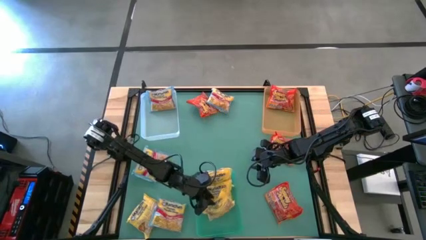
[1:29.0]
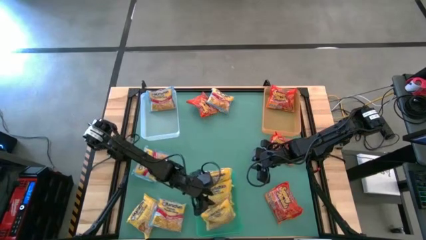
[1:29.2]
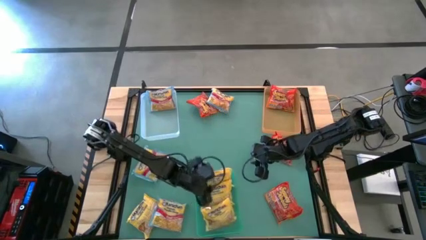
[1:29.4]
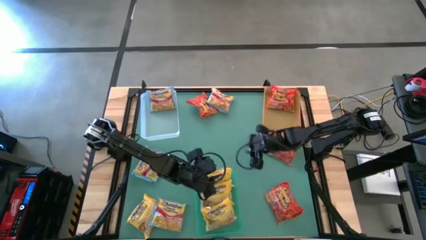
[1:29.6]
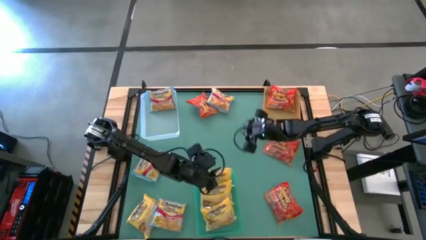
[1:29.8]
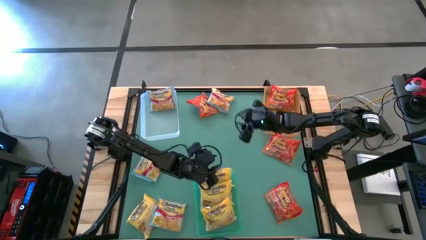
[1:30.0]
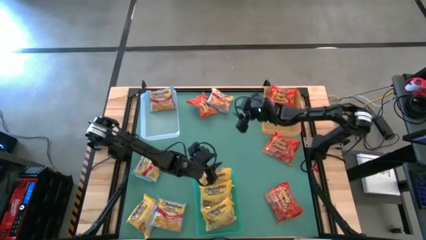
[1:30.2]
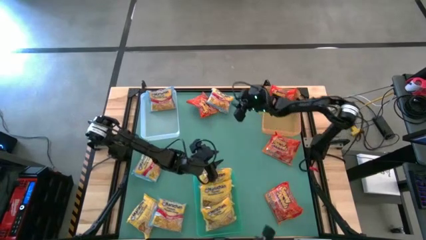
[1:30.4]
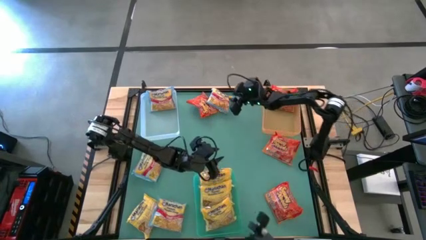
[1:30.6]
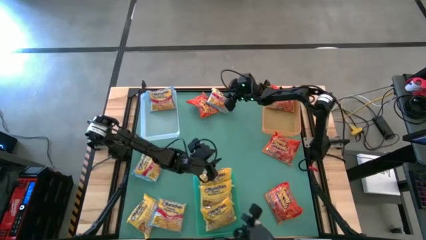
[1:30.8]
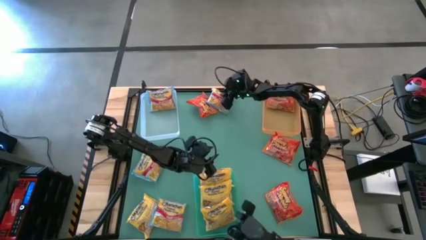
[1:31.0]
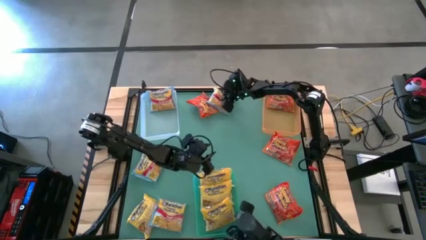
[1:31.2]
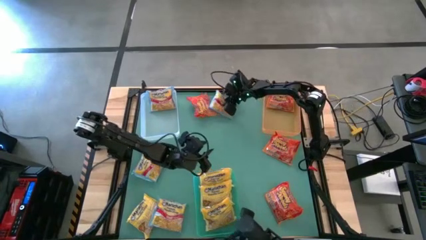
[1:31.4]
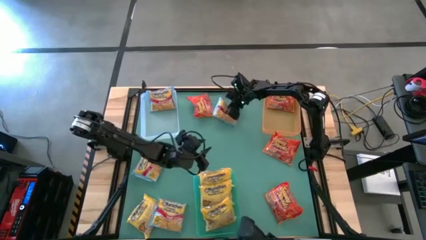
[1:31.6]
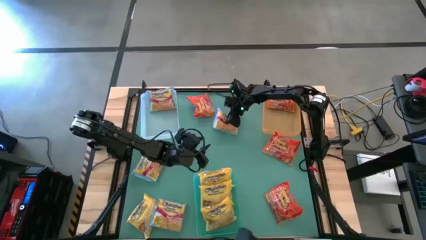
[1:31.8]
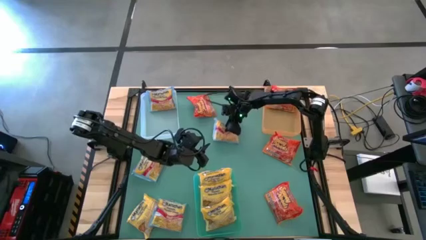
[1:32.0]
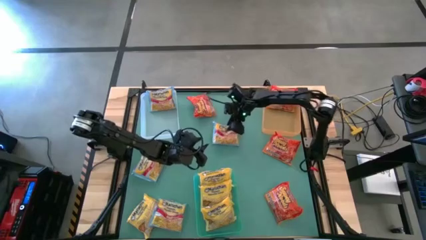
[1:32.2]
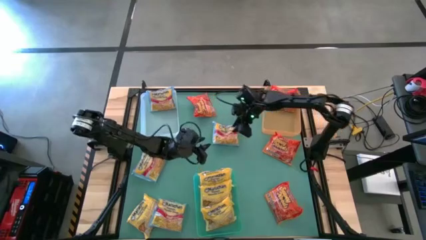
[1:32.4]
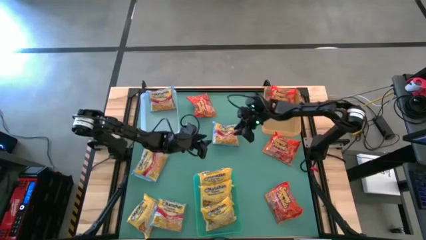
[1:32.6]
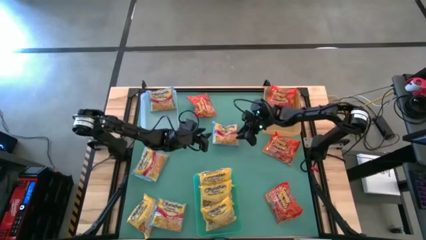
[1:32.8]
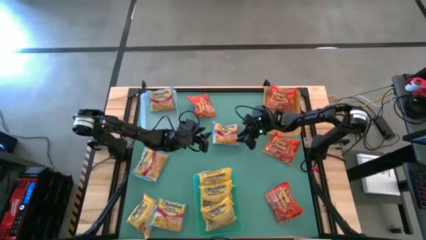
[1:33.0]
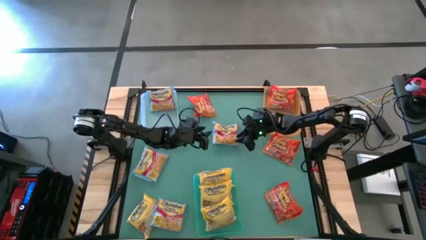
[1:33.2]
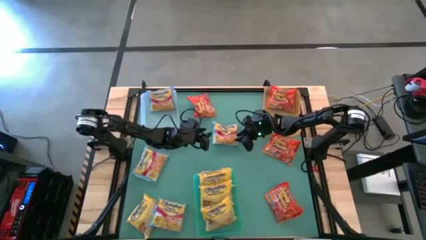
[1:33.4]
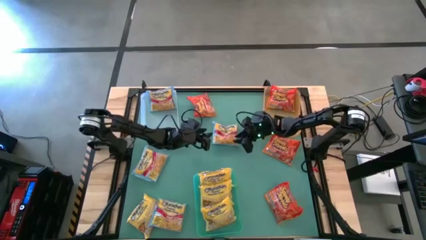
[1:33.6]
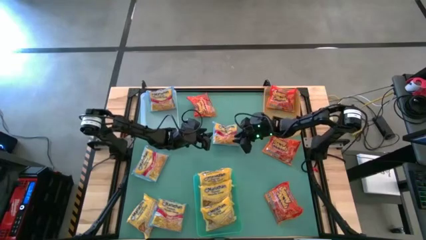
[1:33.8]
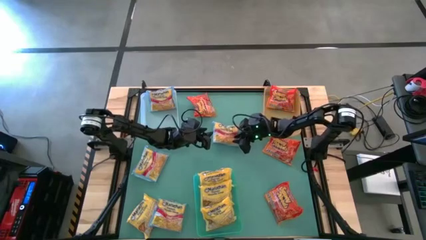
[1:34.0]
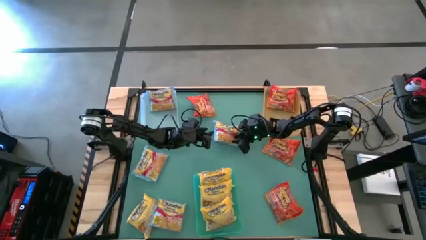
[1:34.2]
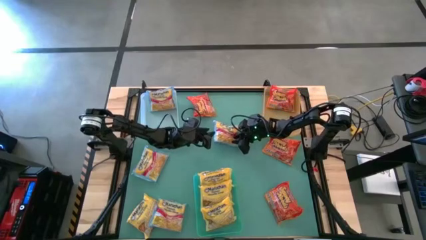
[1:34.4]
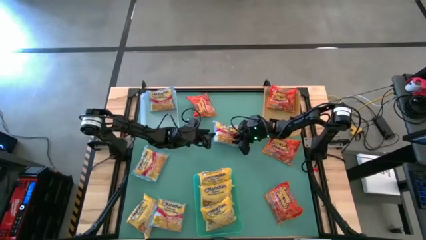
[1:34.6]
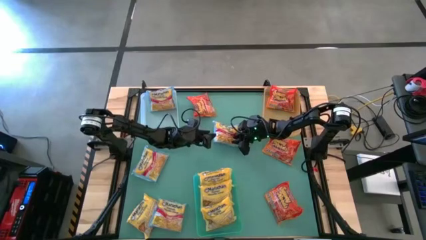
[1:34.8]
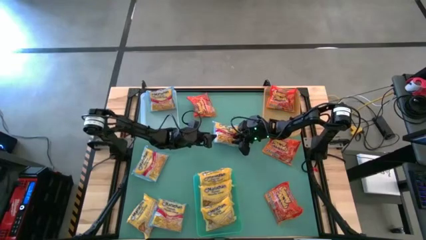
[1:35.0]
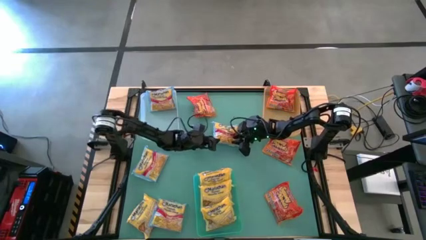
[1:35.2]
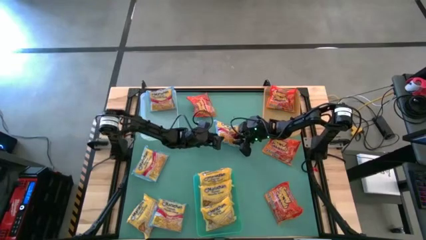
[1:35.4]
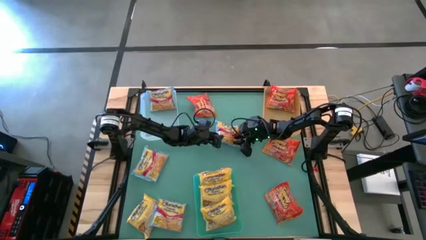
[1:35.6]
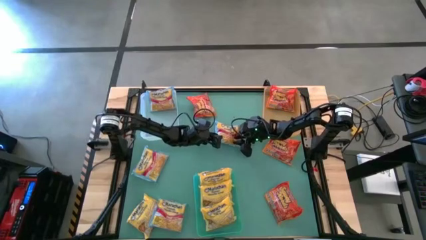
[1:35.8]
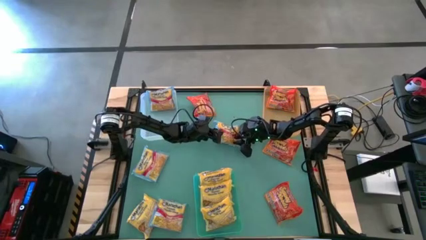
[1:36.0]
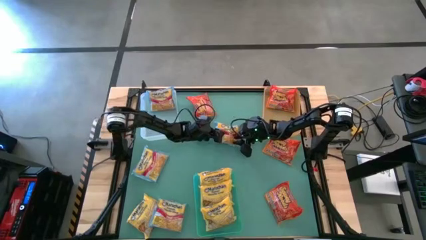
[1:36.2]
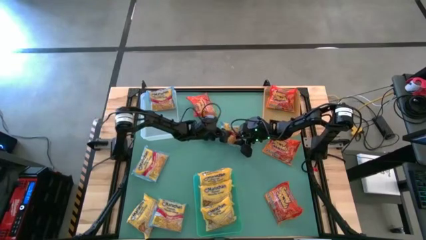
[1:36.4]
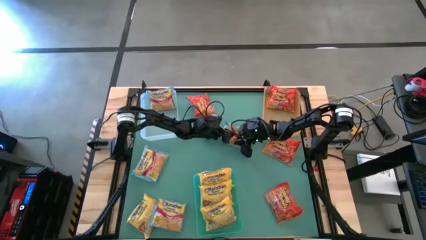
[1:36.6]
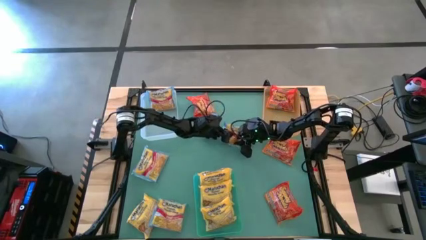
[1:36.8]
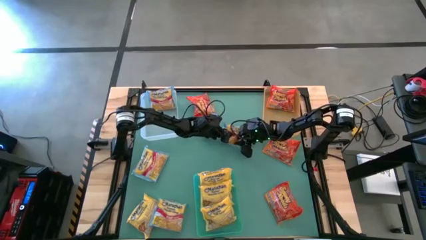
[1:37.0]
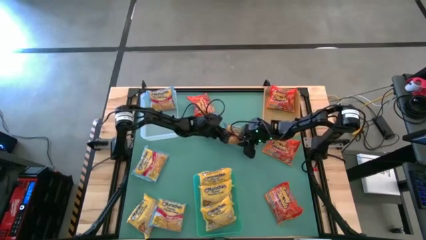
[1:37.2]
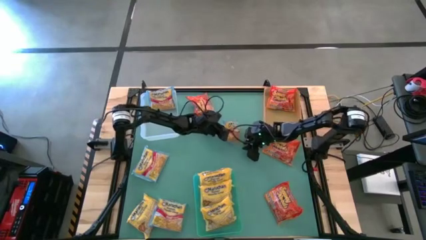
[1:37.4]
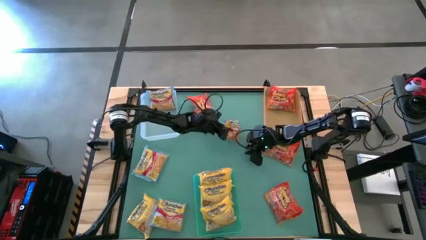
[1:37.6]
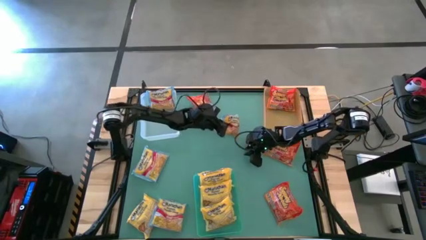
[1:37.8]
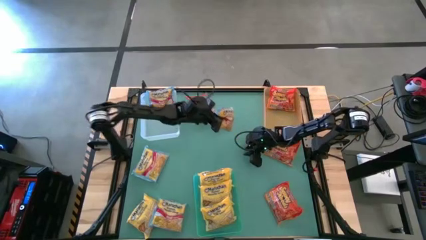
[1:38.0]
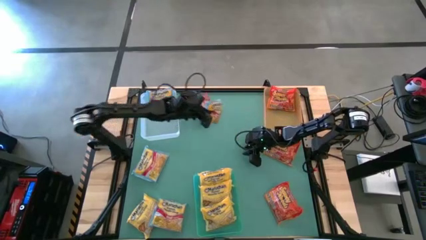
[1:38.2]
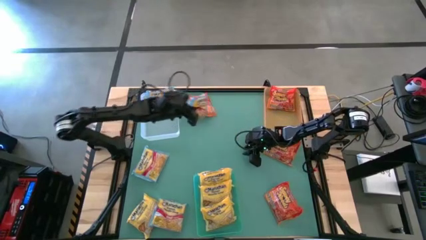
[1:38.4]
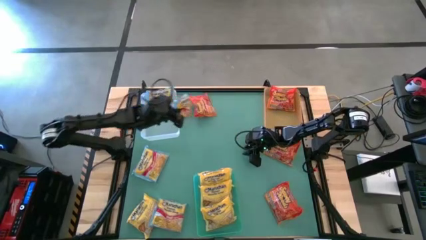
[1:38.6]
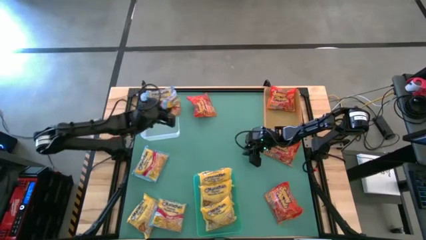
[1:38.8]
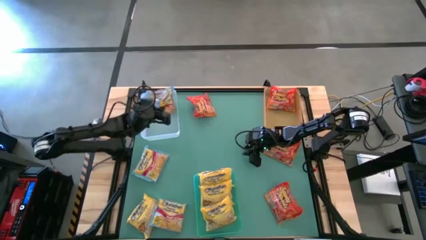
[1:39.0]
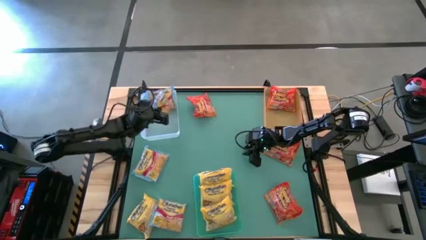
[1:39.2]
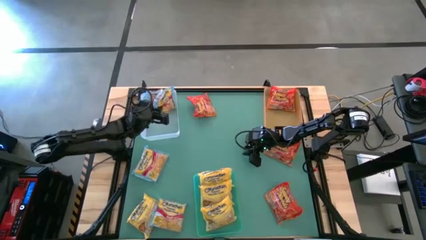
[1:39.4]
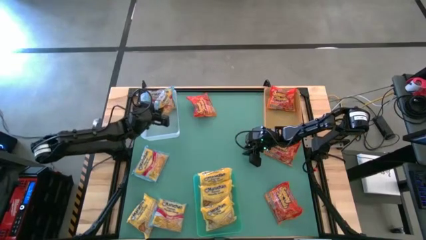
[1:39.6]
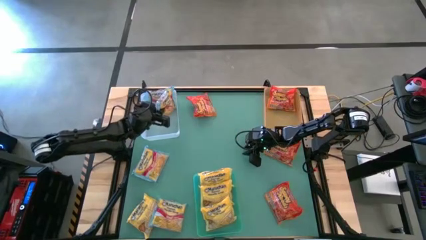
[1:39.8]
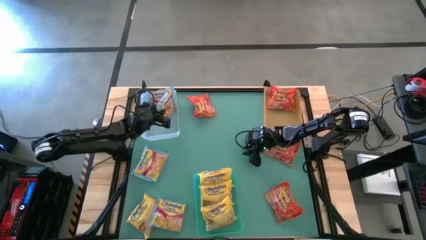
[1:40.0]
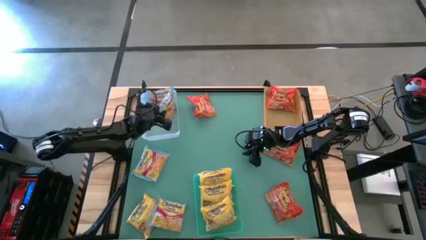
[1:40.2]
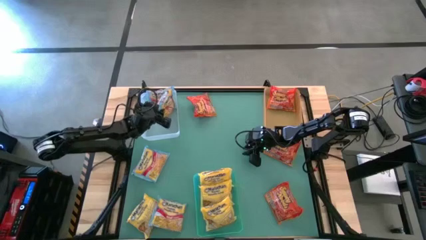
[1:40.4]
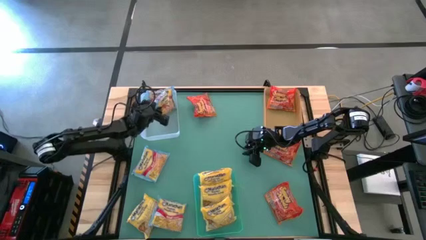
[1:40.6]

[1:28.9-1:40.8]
Task: Sort Maruchan noodles
Put the top blue noodle pack into the transparent bin
